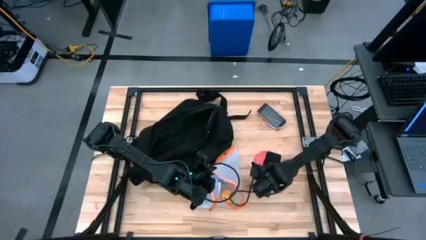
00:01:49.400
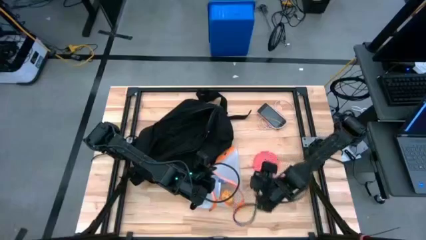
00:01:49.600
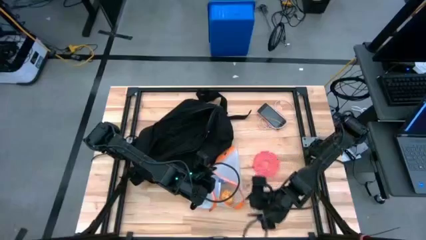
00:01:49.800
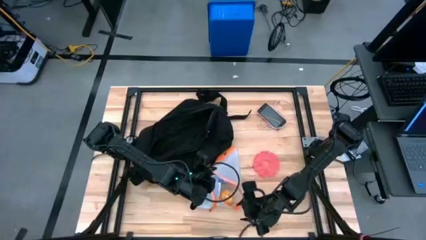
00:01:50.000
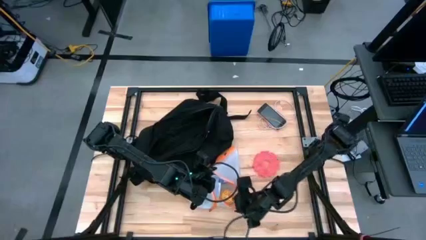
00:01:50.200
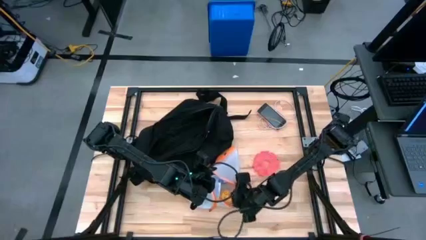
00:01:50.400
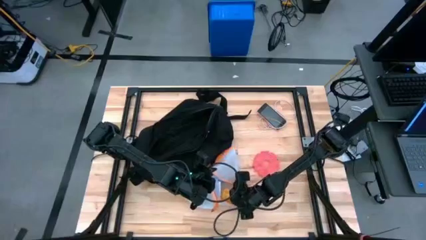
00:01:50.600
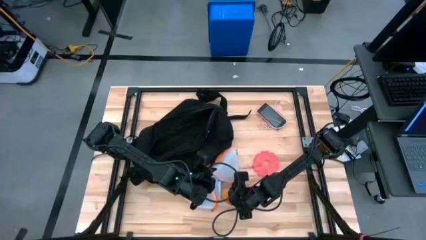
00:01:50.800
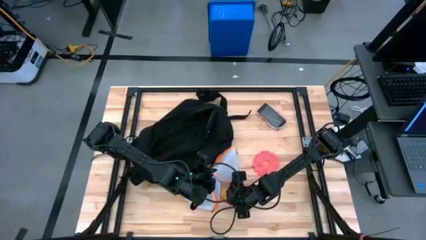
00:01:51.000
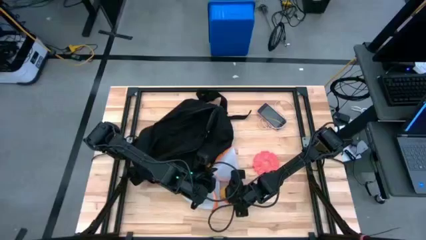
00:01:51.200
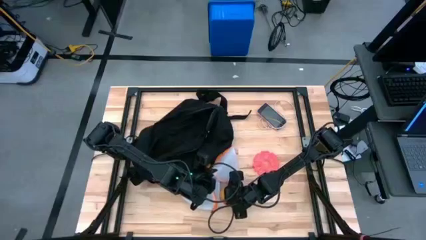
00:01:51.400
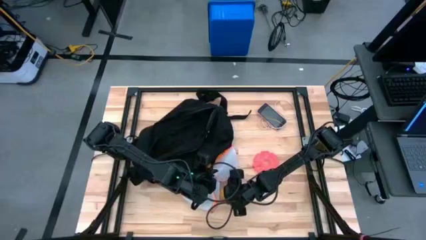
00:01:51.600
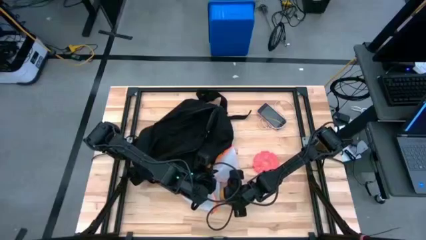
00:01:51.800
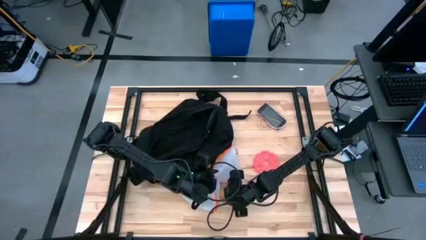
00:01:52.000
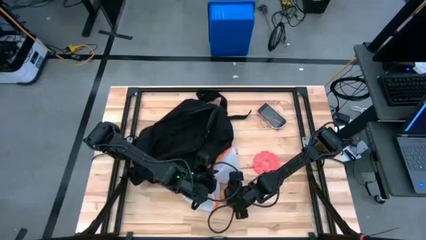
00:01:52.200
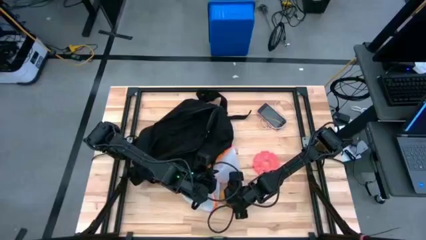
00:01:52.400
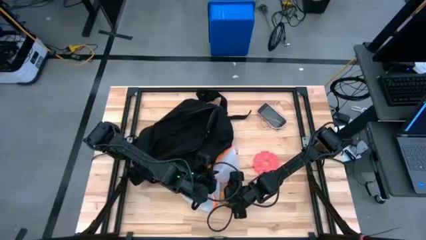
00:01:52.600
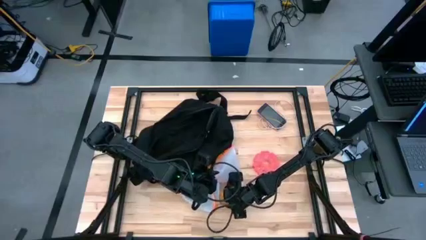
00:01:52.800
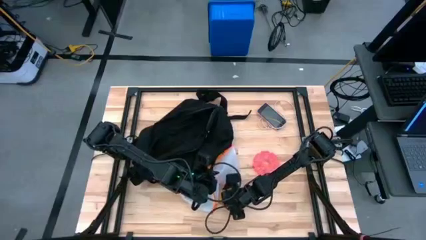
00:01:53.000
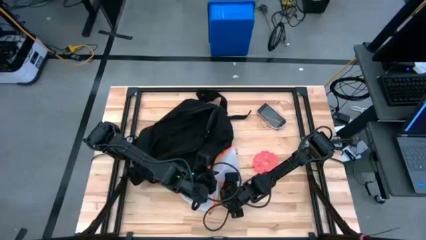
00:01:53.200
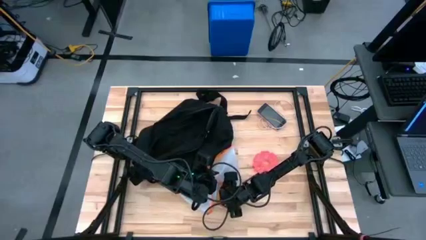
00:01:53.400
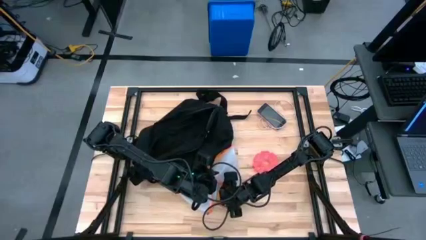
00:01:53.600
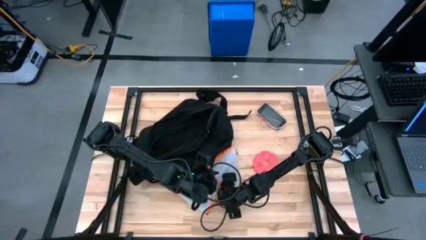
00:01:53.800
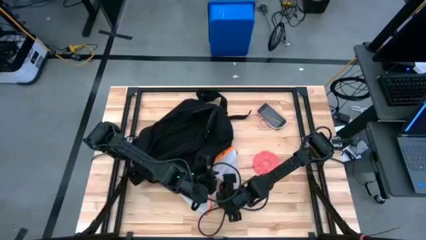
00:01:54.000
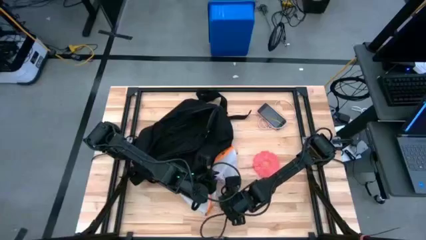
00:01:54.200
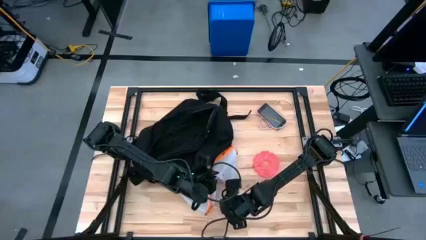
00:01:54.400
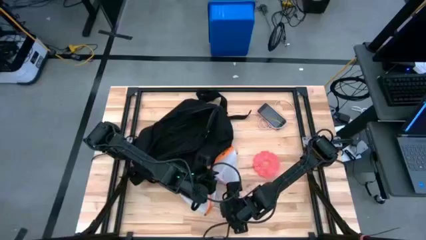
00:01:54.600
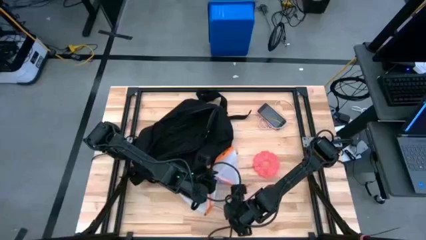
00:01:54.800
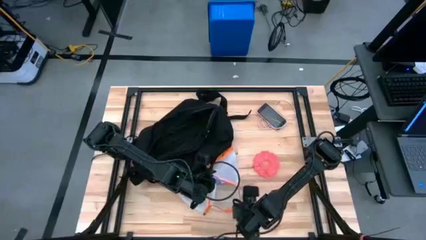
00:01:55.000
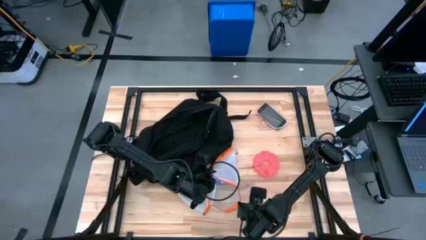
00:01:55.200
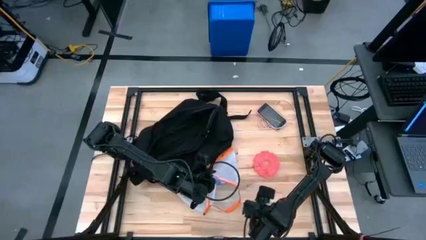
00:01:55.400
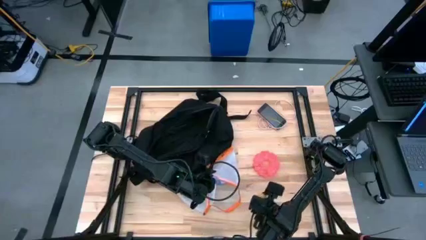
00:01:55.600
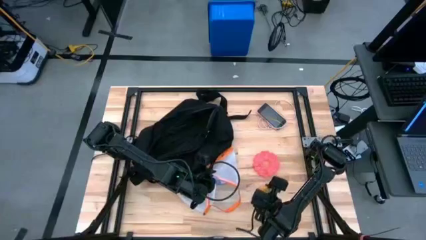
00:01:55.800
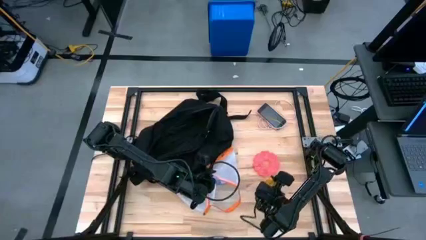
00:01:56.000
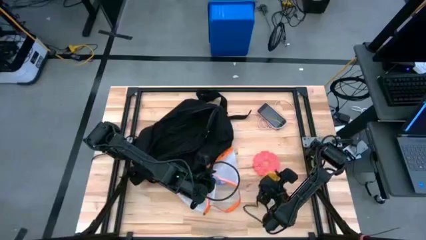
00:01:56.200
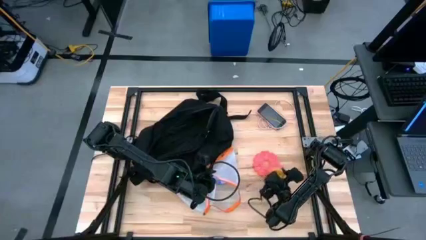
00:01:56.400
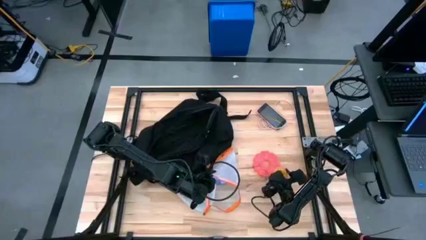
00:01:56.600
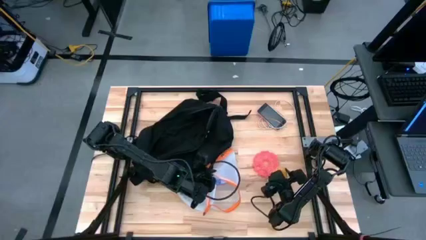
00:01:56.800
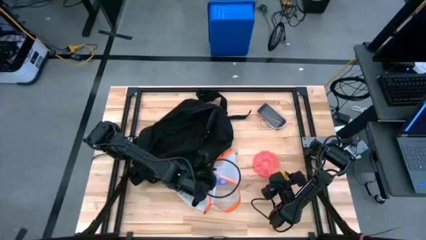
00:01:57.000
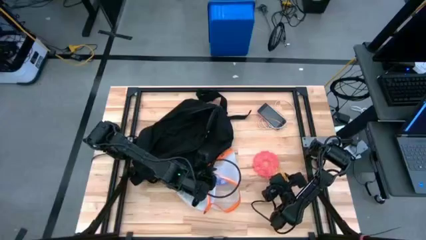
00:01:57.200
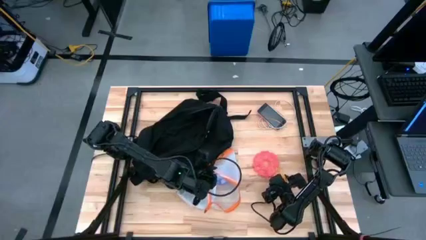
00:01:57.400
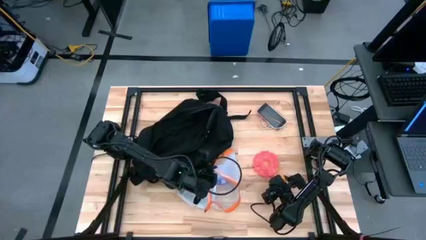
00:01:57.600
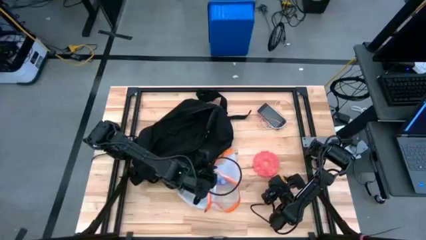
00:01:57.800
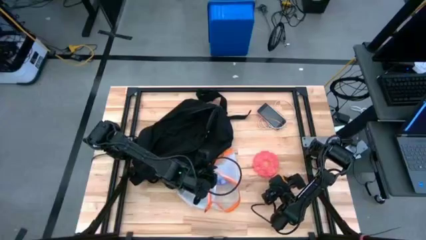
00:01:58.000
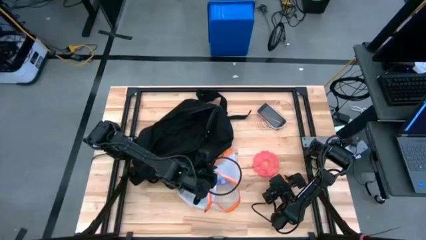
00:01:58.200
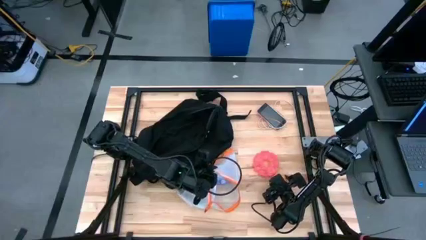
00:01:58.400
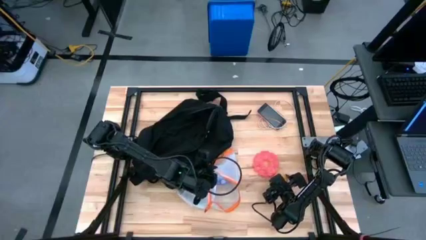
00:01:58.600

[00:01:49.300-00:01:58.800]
Task: Unpack backpack
Remove the yellow scented candle from the orange zip bag

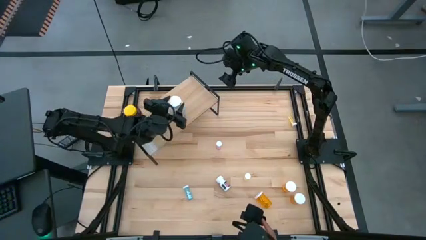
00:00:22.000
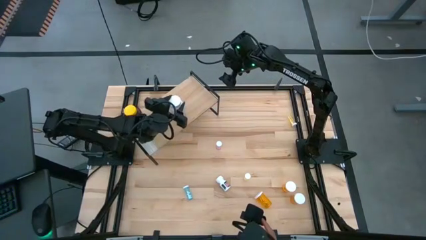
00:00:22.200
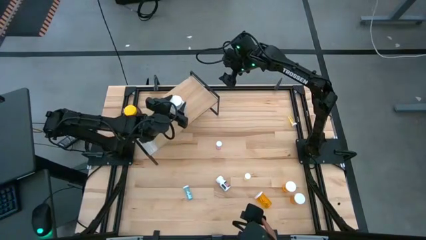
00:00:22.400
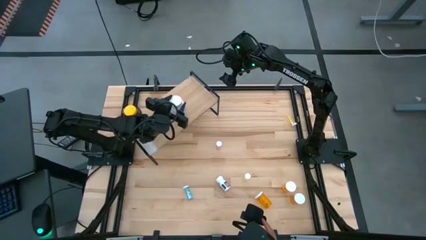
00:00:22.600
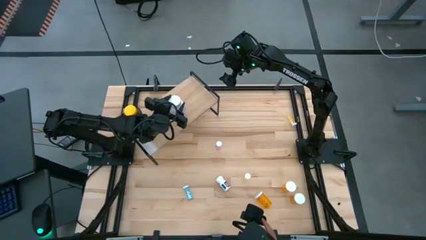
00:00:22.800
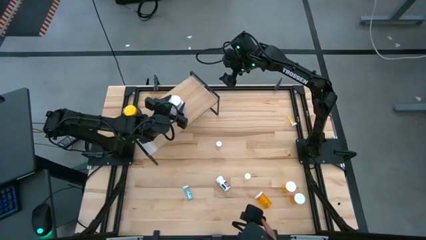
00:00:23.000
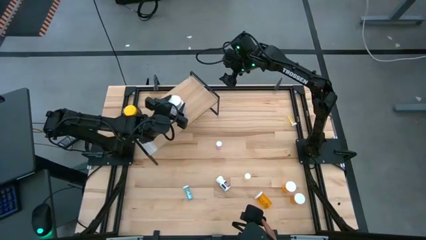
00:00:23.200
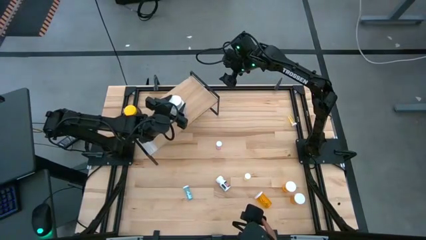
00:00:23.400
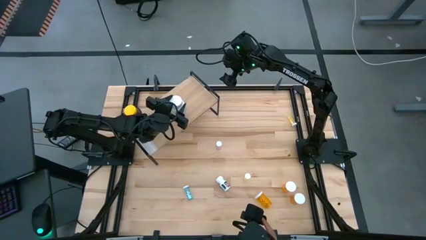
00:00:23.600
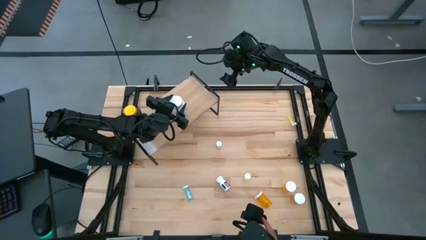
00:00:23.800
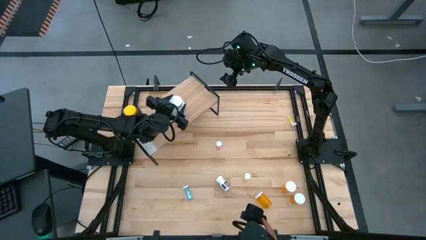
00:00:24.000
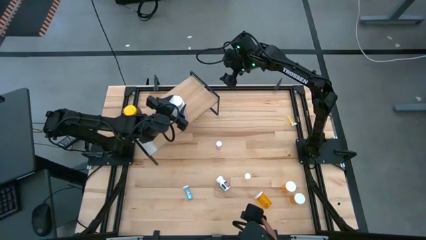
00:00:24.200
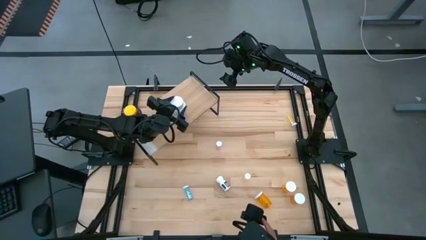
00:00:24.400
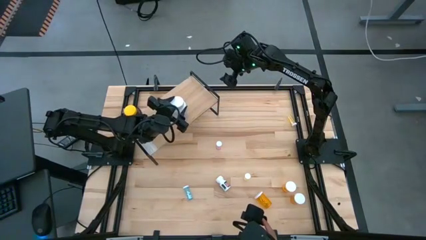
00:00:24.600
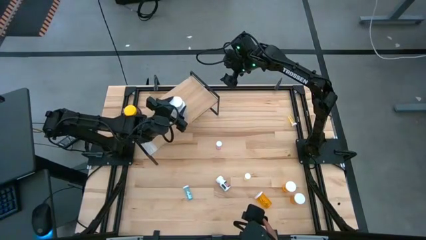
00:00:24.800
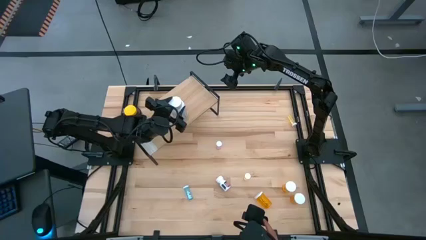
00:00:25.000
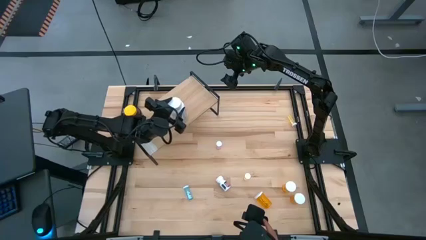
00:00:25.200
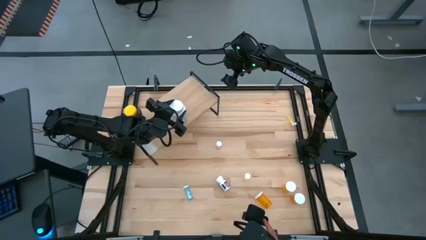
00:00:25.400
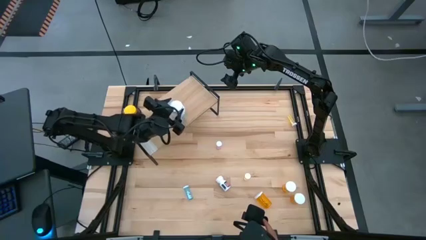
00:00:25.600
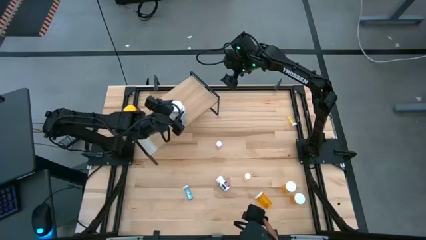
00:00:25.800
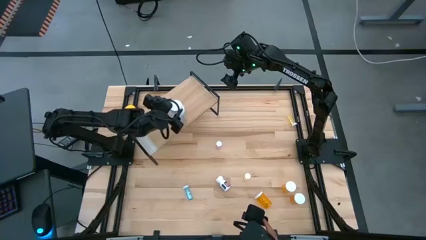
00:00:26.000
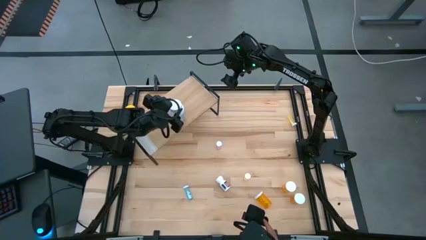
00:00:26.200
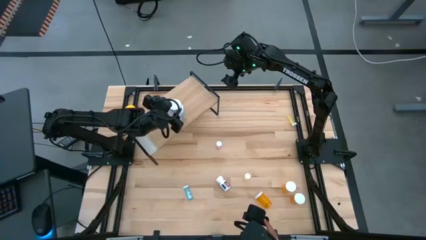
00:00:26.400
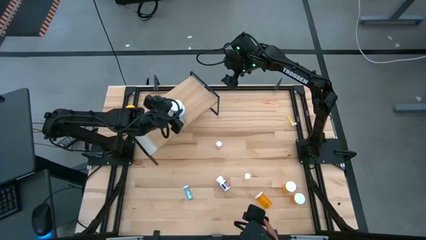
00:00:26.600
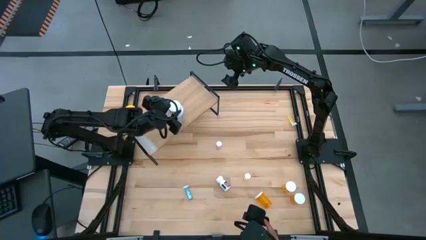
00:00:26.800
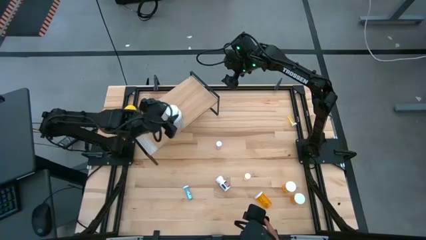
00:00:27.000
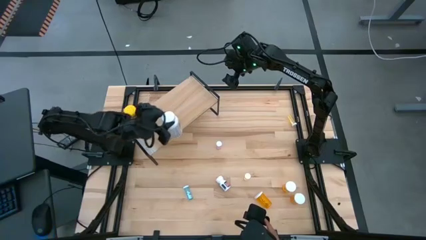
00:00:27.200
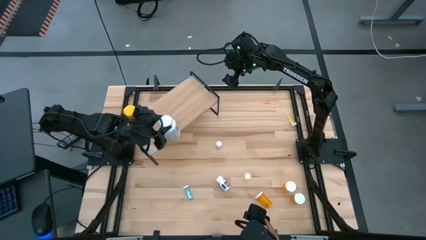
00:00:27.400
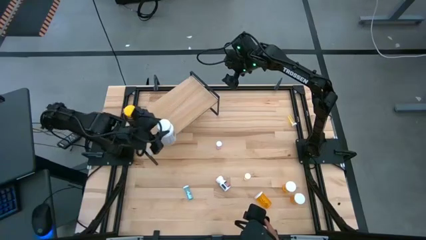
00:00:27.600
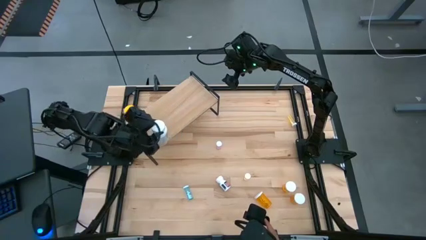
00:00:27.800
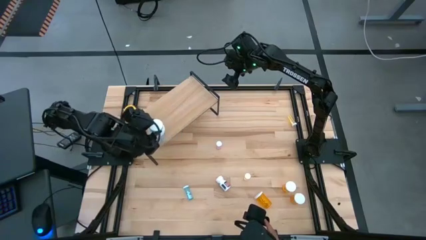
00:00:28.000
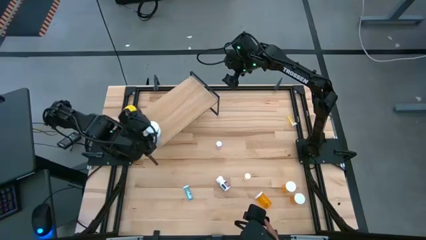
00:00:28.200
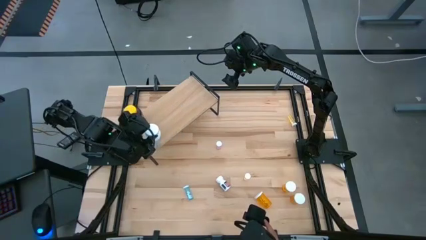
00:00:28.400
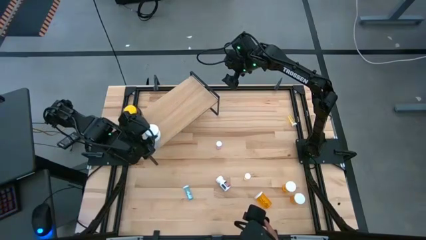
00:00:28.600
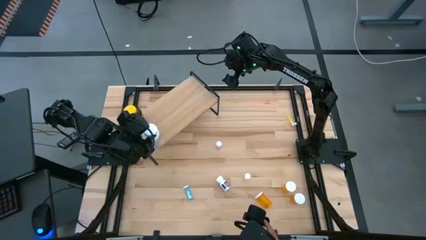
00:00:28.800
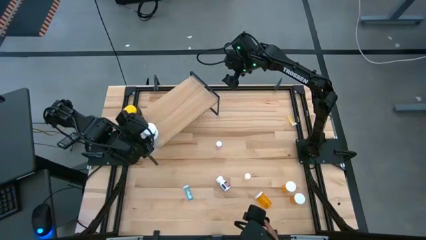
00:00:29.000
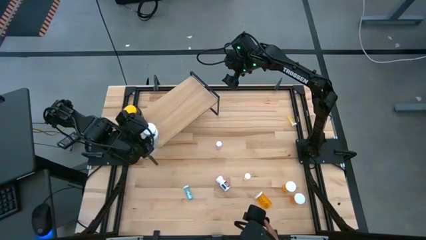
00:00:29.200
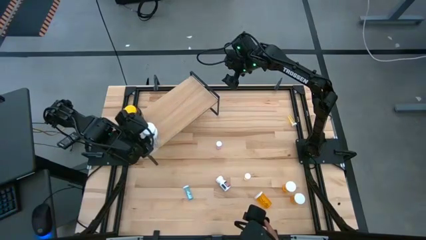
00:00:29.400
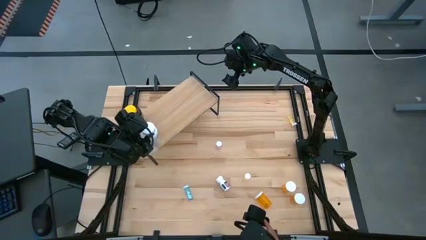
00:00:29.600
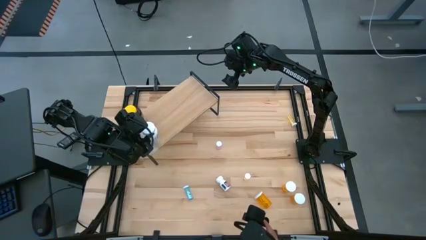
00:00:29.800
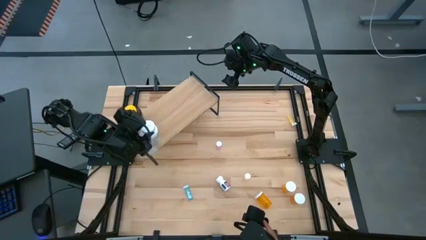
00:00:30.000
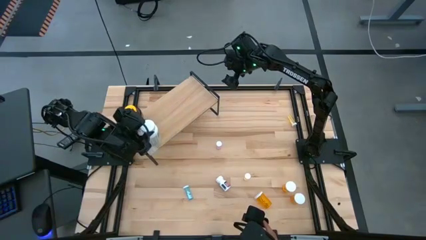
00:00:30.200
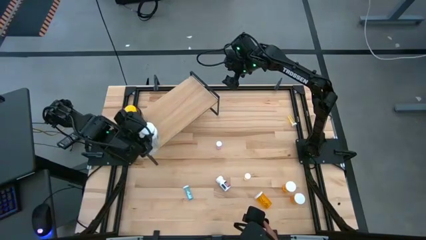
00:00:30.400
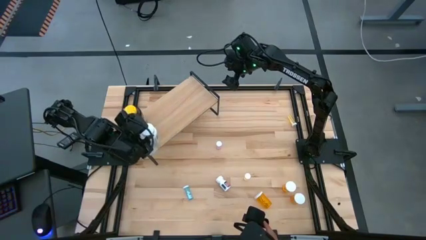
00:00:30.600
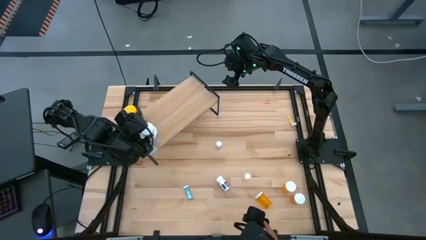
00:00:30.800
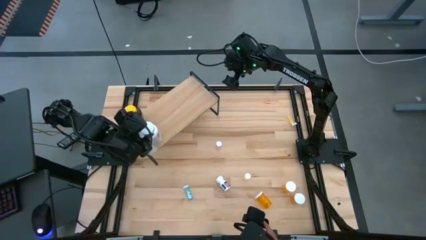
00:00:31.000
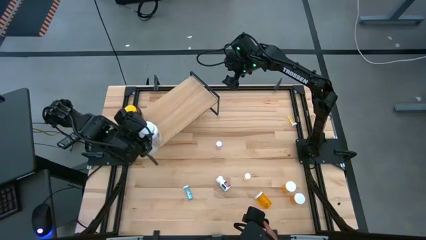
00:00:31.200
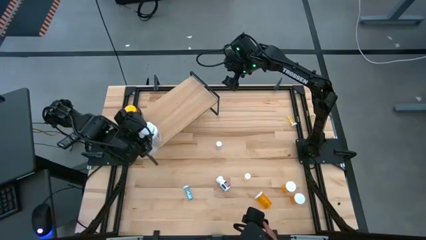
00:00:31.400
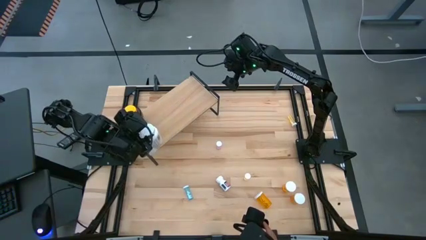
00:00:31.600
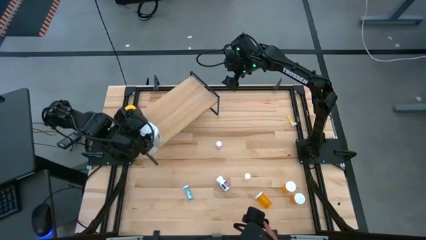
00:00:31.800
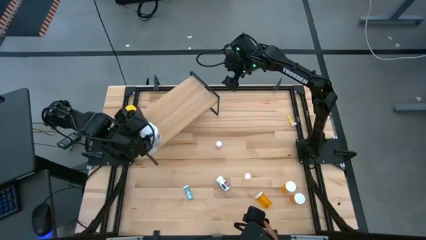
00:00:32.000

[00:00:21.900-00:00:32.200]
Task: Pick and place medicine bottles onto shelf by color
Put the large white pill bottle on the shelf
